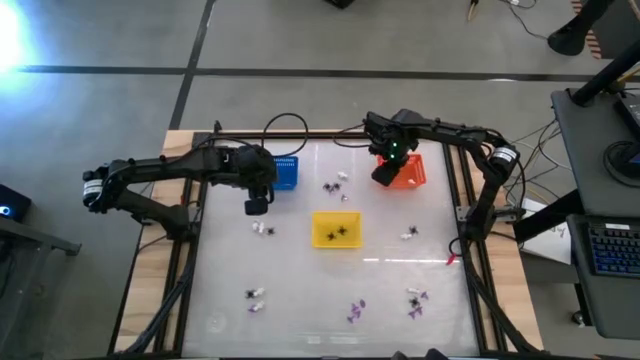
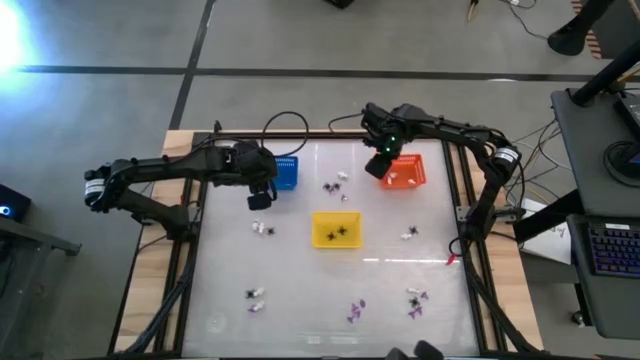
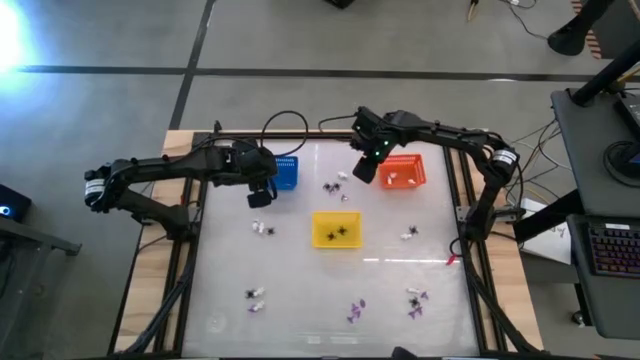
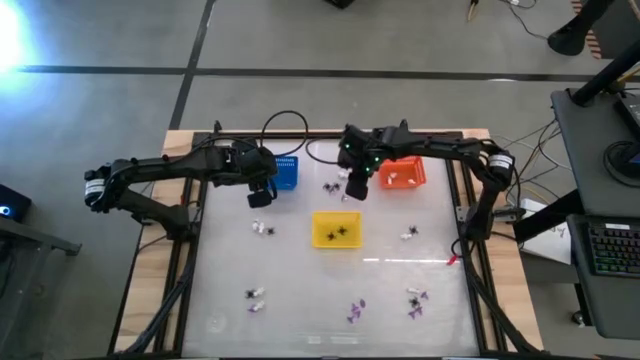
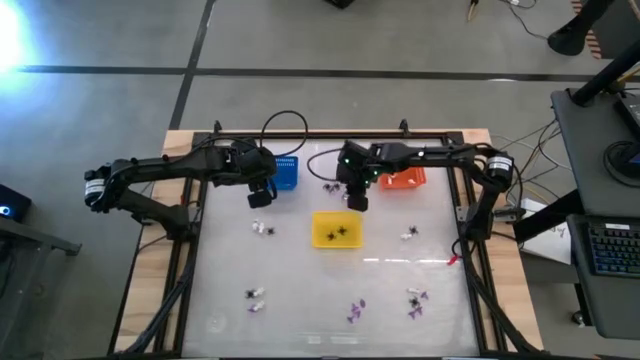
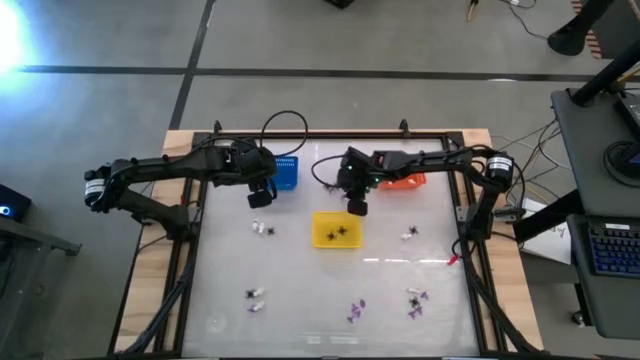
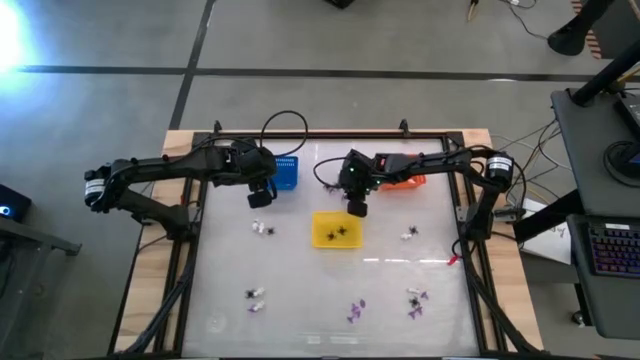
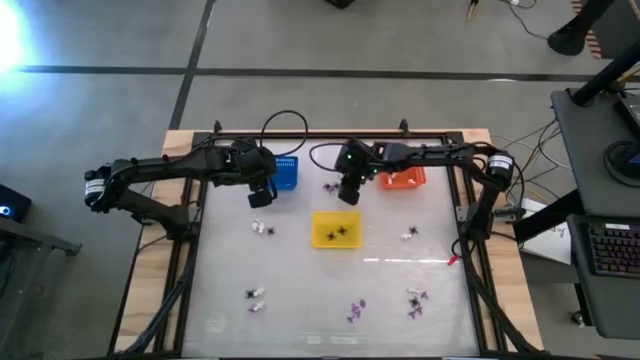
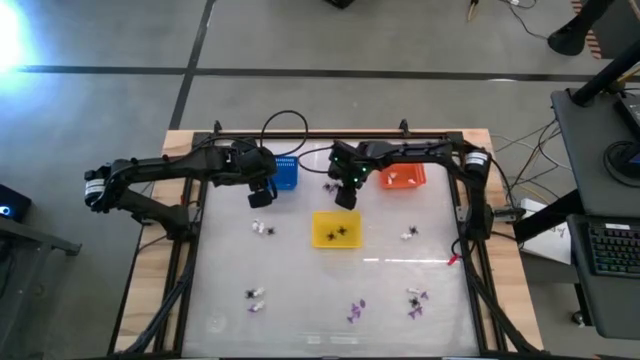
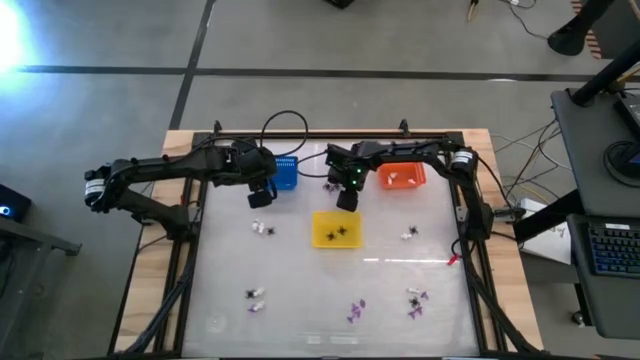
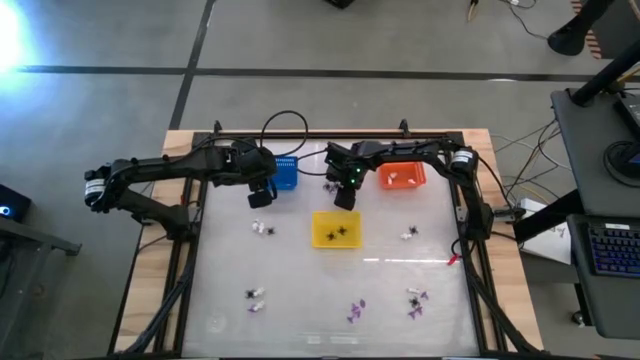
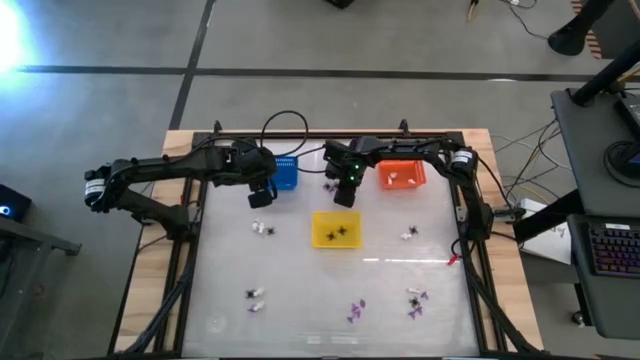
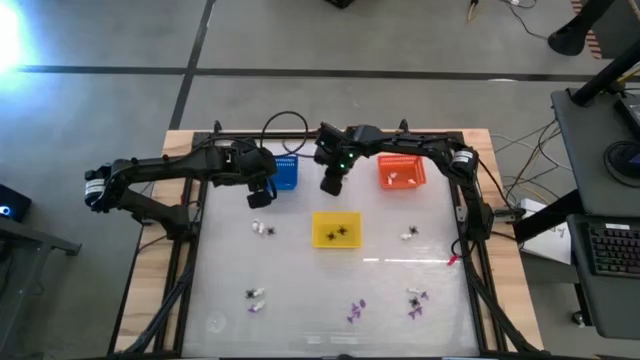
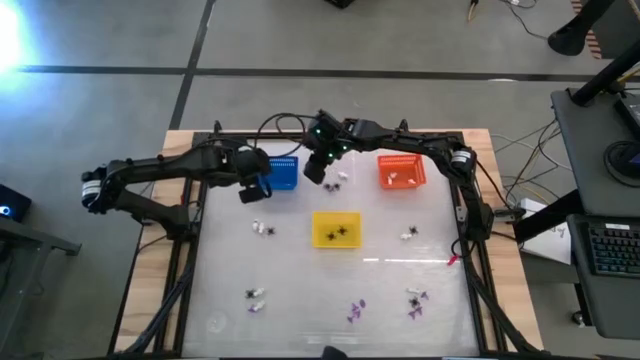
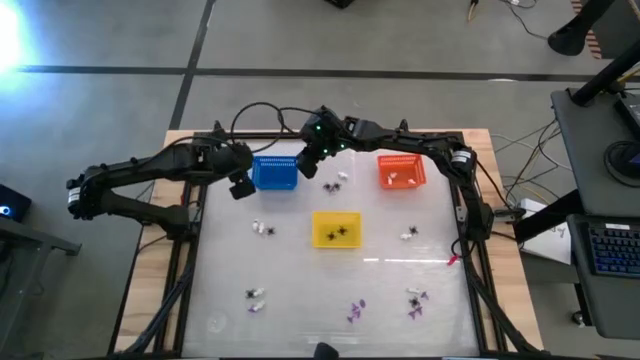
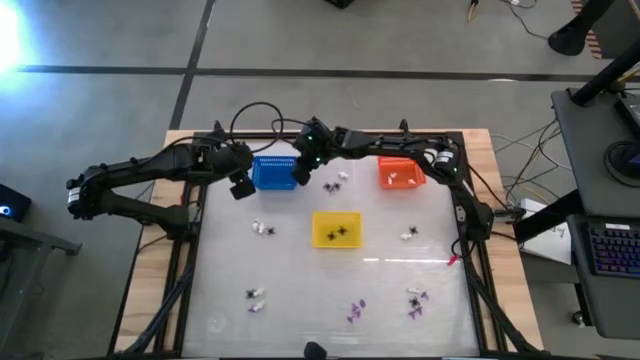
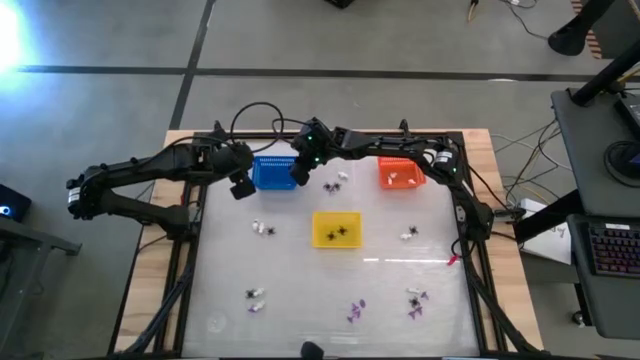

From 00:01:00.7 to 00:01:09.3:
Task: Sort Halloween decoration
Put the purple witch hat toy into the blue bin

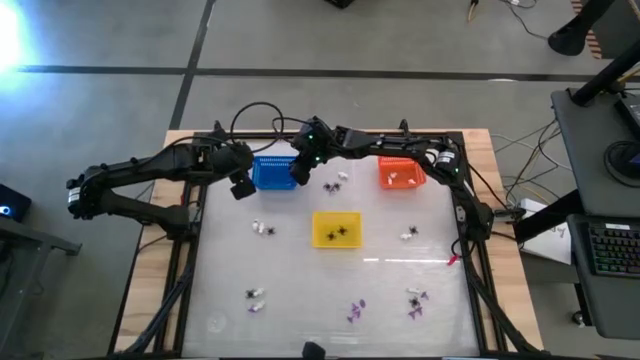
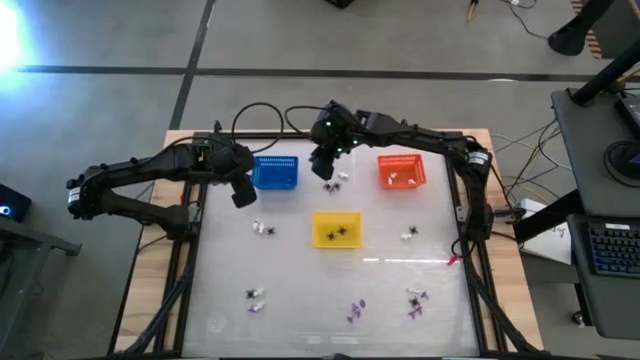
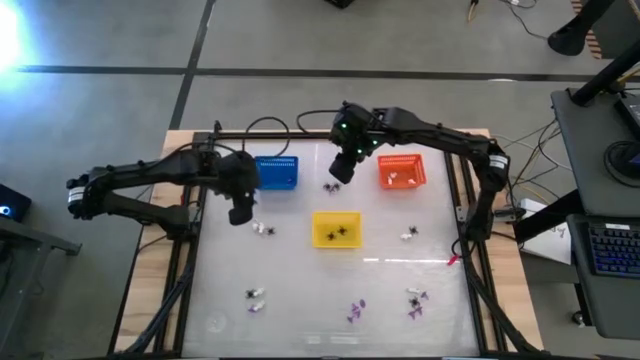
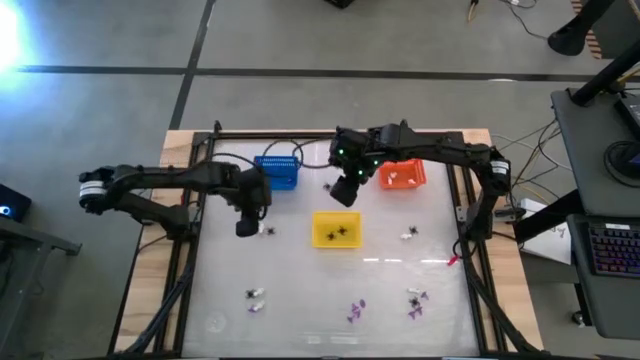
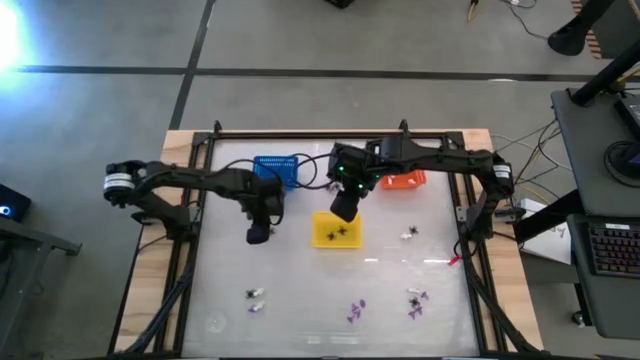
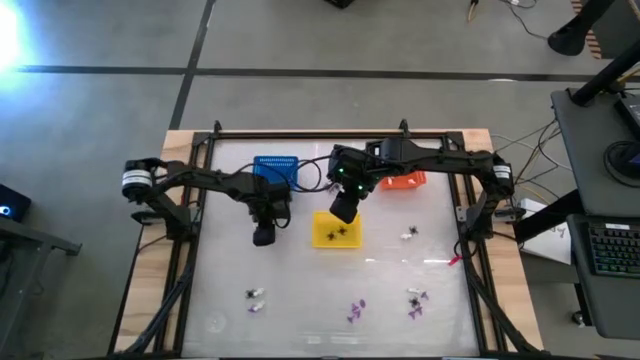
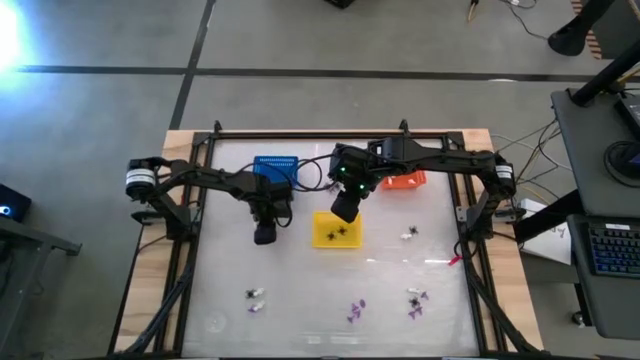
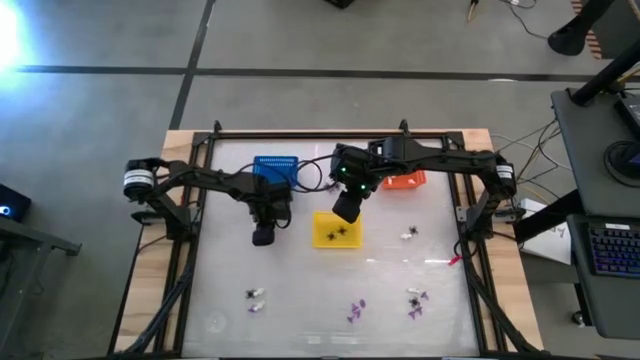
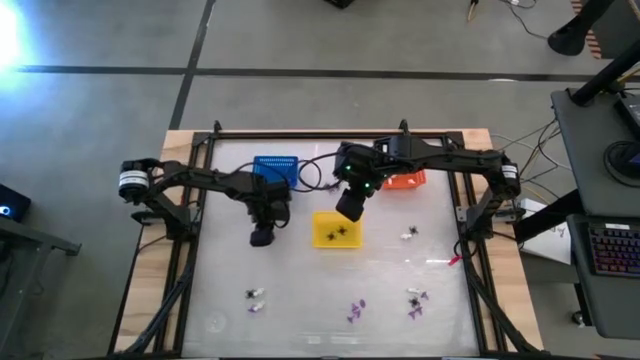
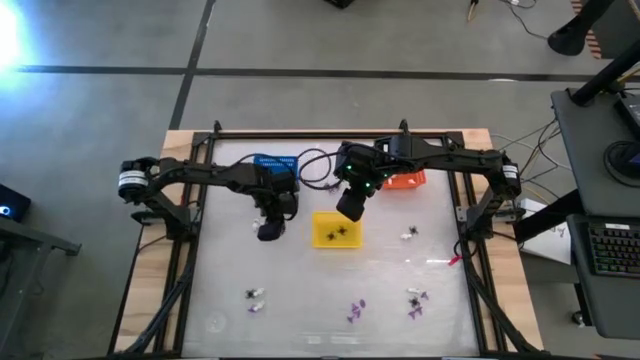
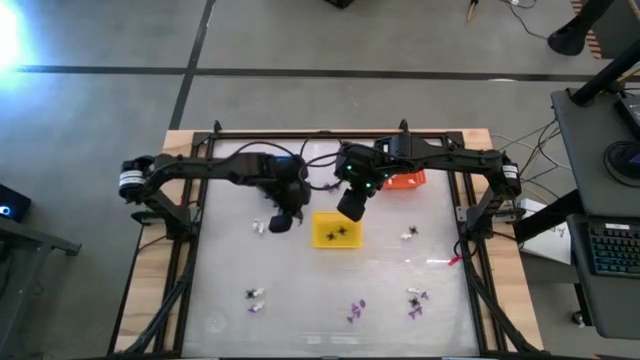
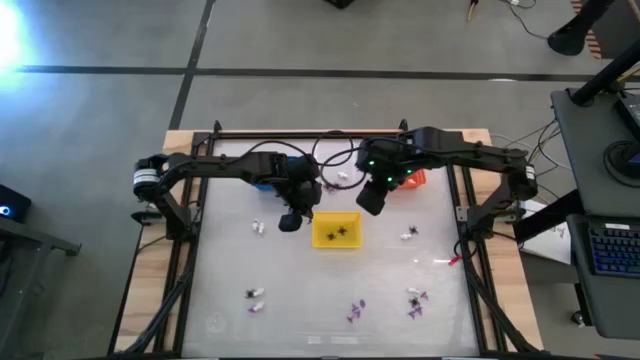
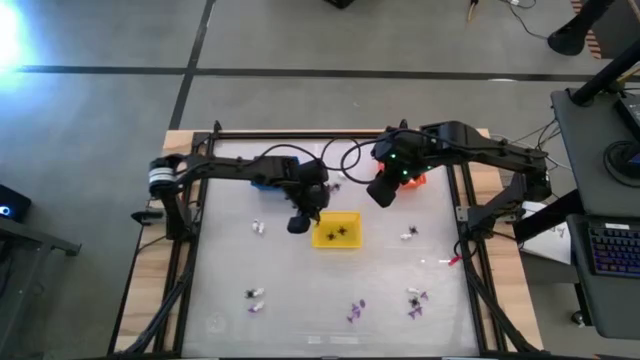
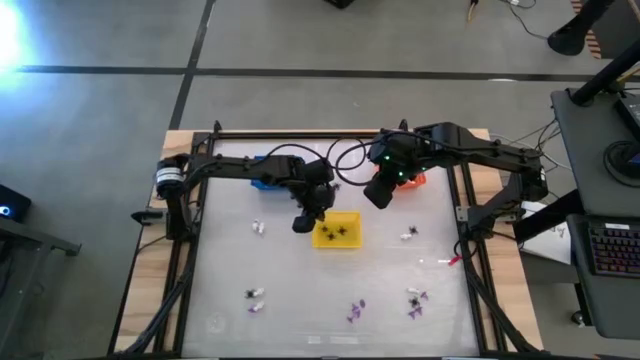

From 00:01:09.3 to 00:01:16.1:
Put the black spider toy into the yellow bin

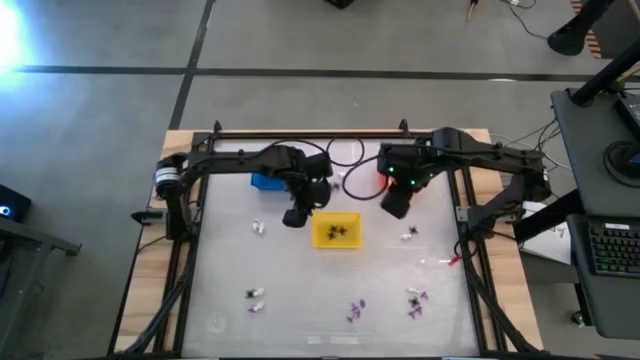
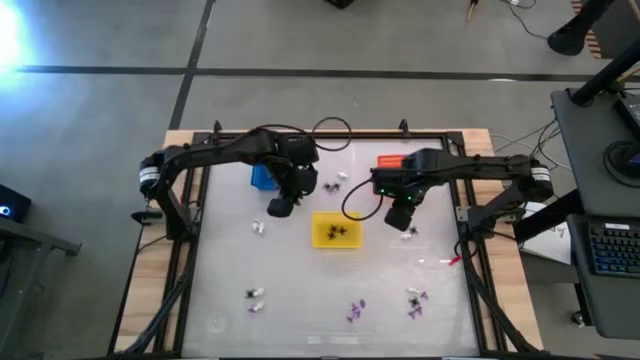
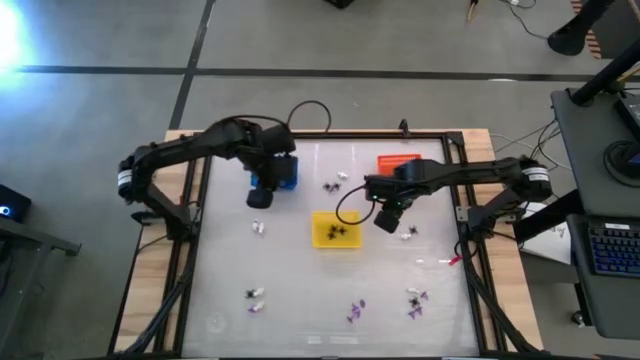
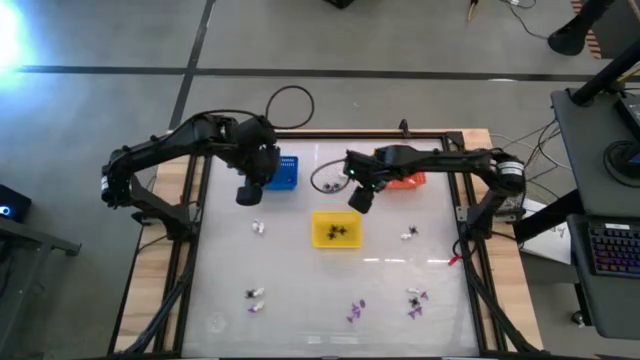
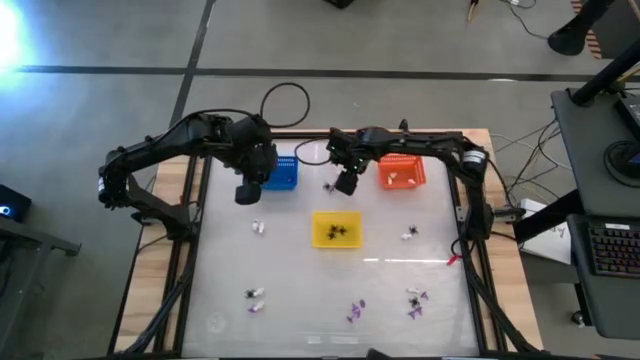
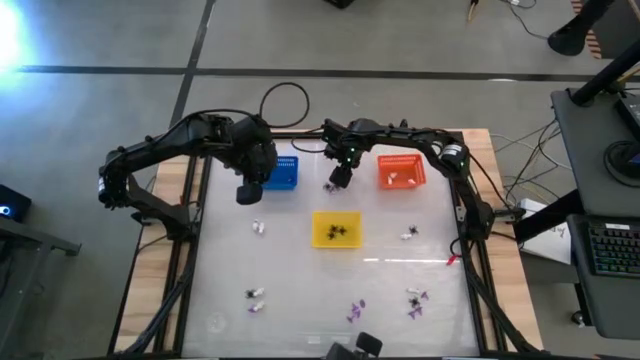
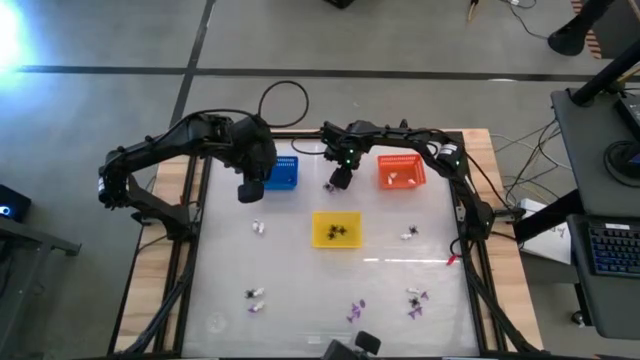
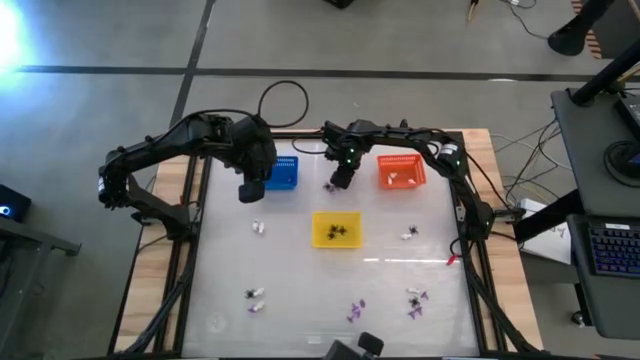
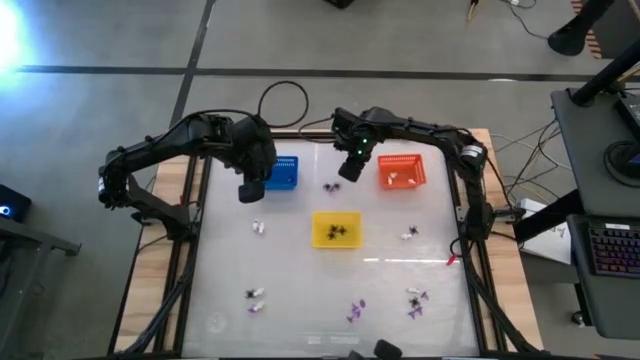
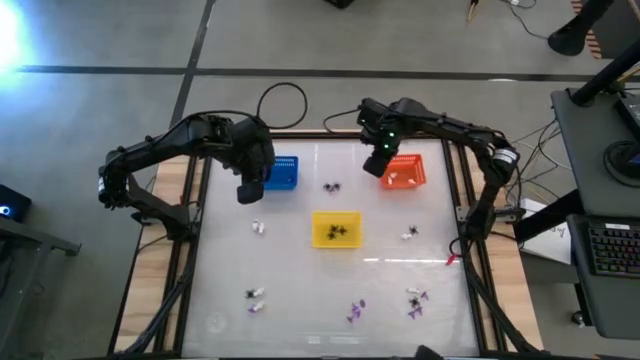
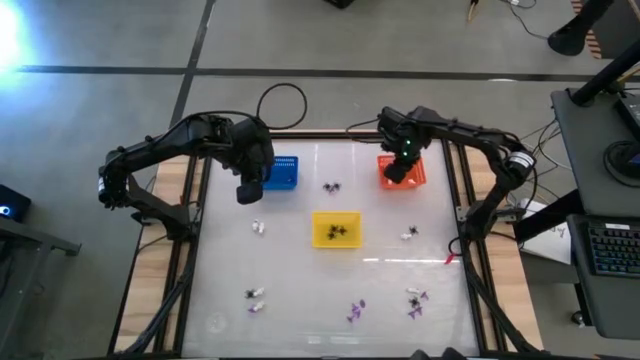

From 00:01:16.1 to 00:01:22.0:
Put the white skeleton toy into the orange bin
